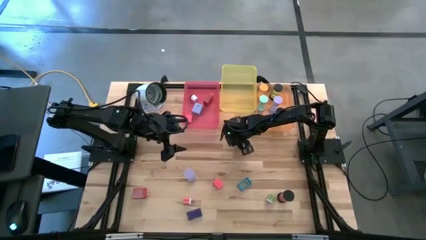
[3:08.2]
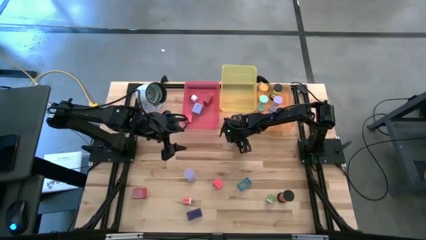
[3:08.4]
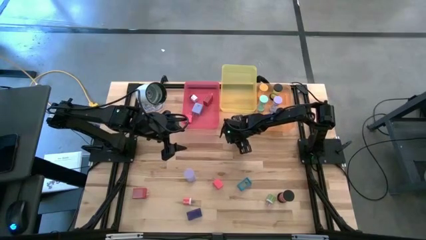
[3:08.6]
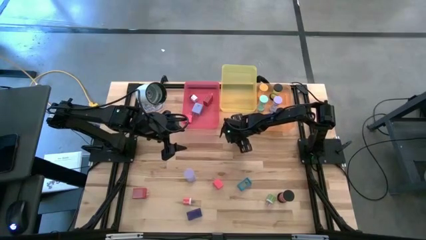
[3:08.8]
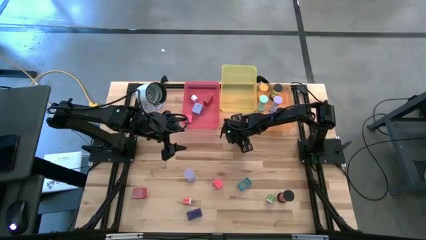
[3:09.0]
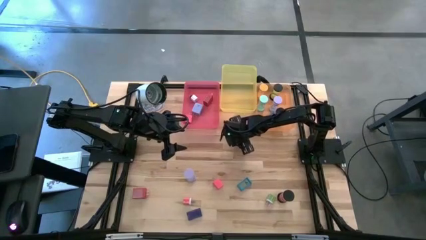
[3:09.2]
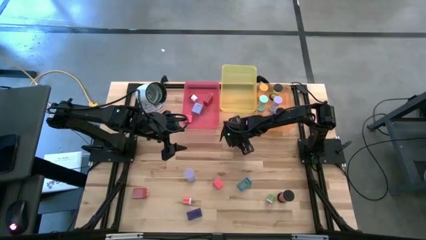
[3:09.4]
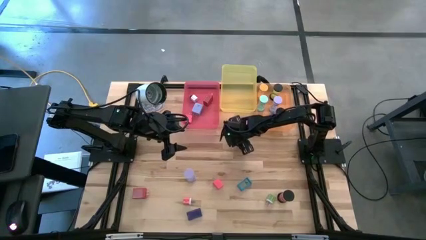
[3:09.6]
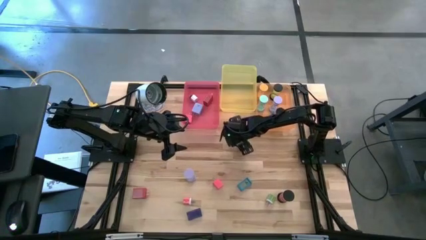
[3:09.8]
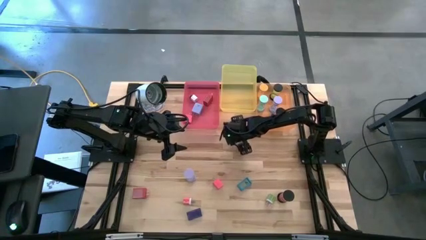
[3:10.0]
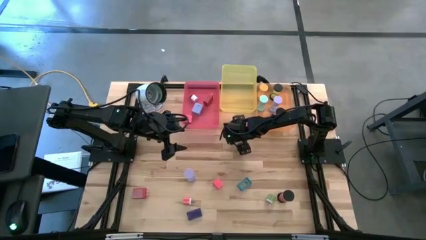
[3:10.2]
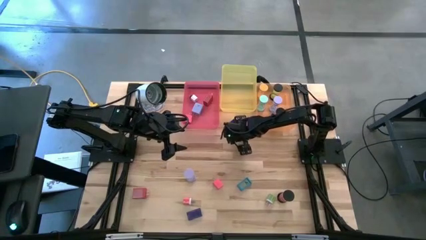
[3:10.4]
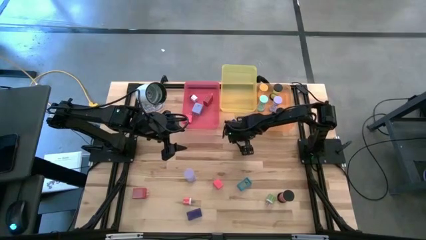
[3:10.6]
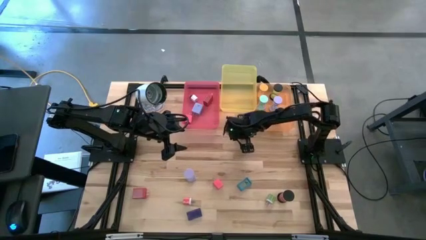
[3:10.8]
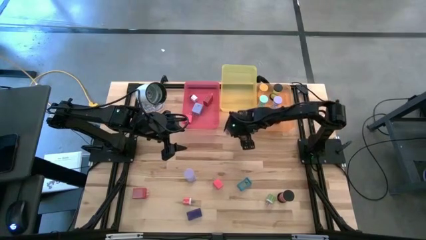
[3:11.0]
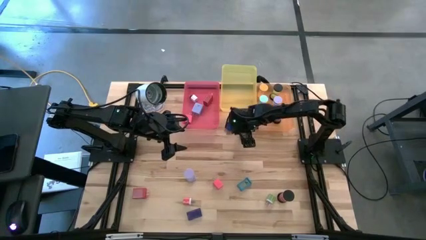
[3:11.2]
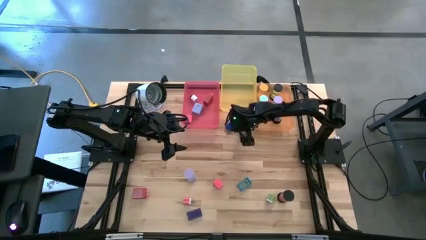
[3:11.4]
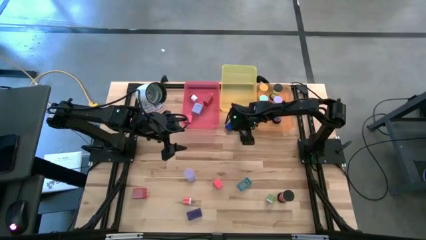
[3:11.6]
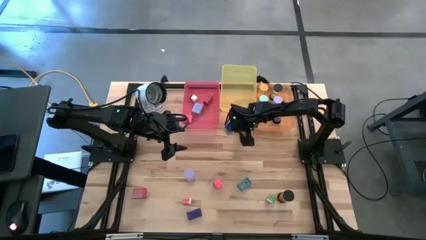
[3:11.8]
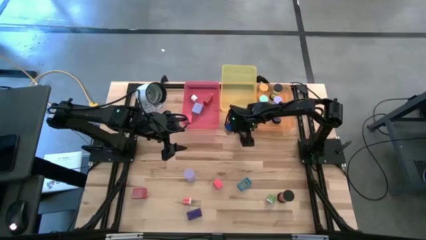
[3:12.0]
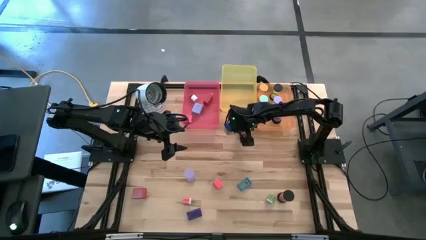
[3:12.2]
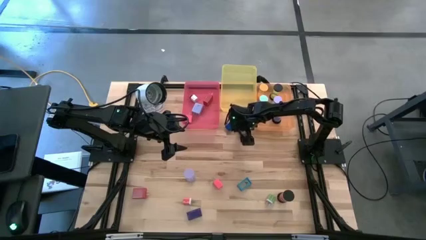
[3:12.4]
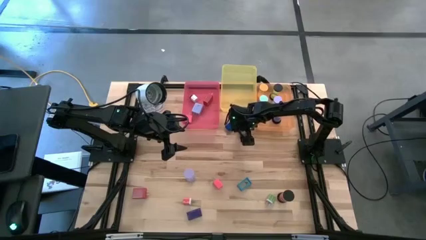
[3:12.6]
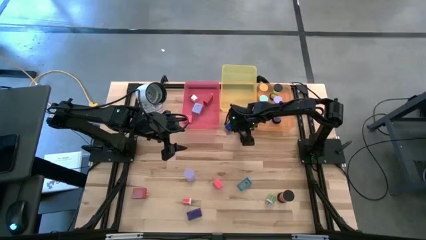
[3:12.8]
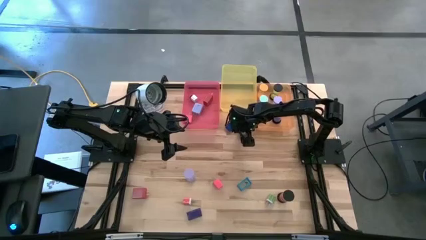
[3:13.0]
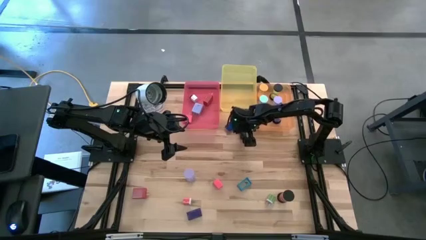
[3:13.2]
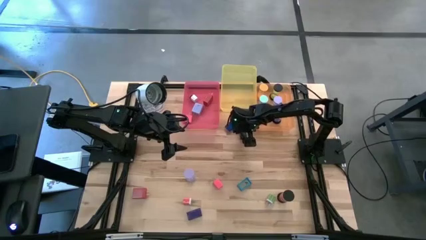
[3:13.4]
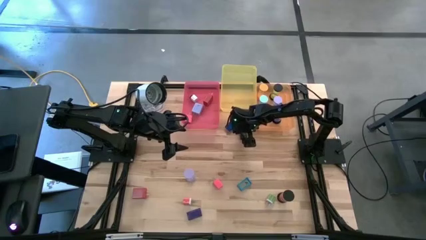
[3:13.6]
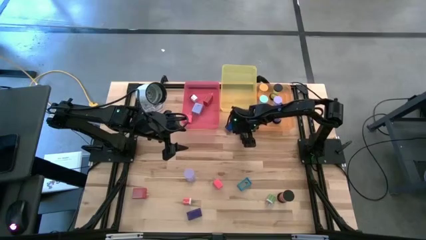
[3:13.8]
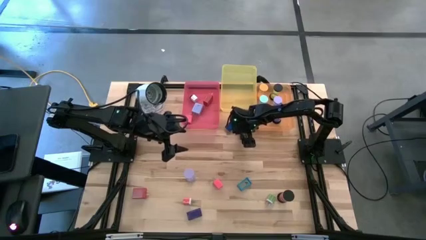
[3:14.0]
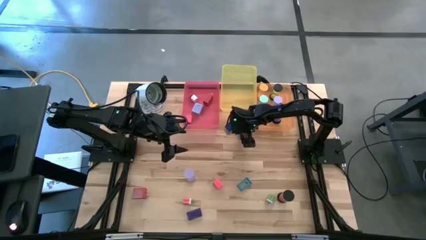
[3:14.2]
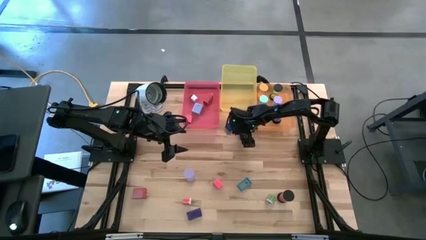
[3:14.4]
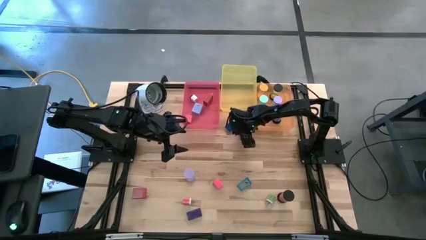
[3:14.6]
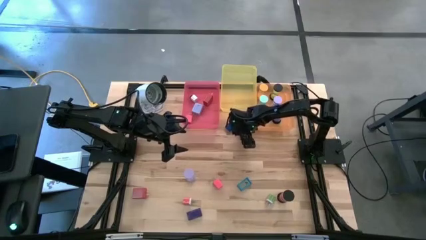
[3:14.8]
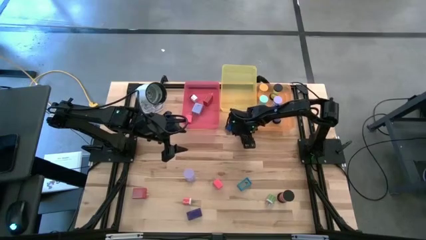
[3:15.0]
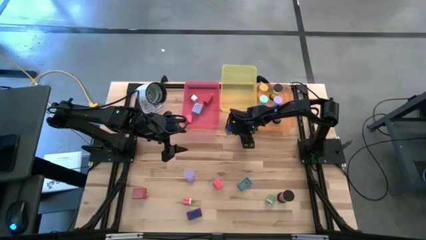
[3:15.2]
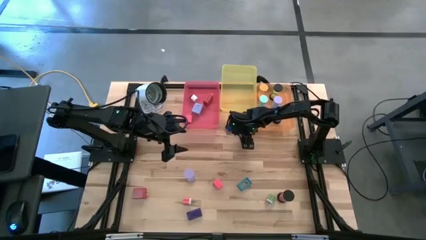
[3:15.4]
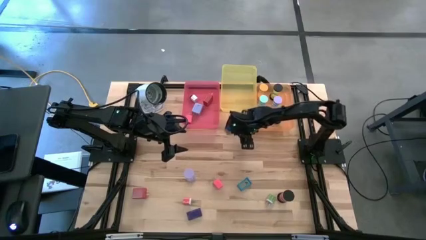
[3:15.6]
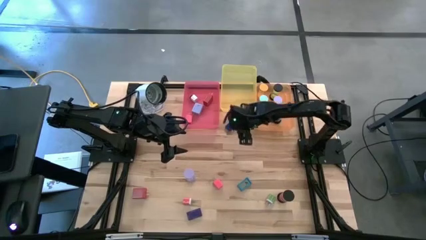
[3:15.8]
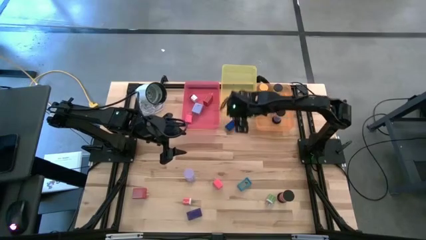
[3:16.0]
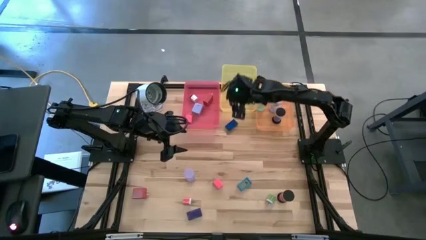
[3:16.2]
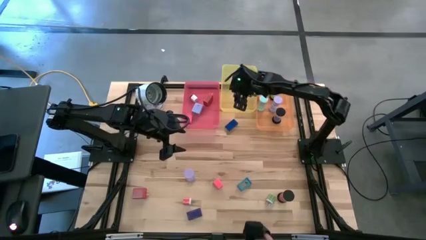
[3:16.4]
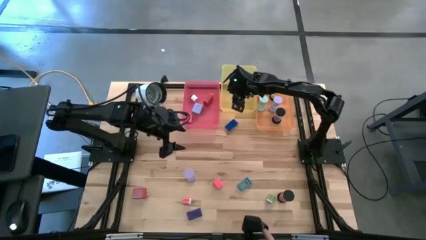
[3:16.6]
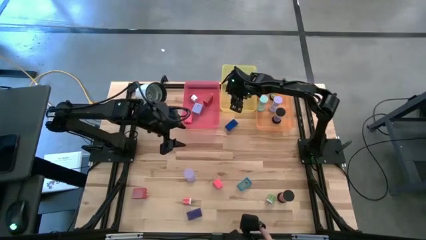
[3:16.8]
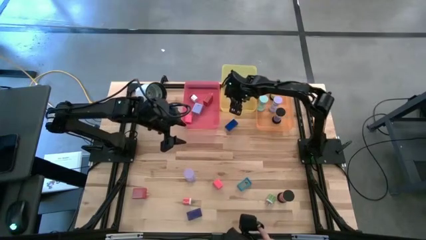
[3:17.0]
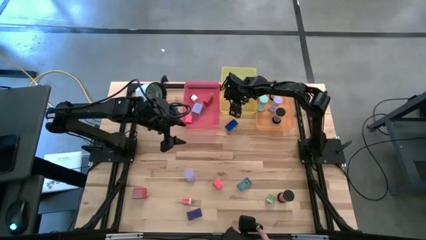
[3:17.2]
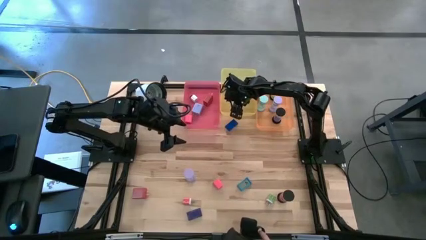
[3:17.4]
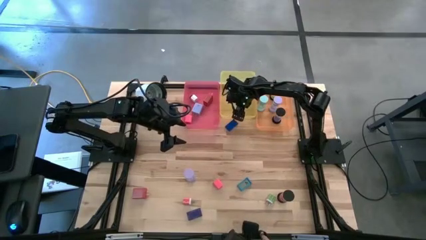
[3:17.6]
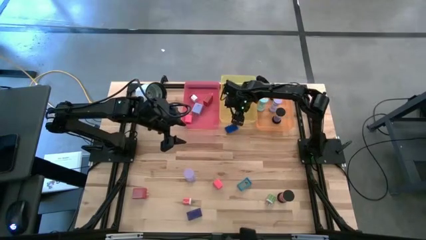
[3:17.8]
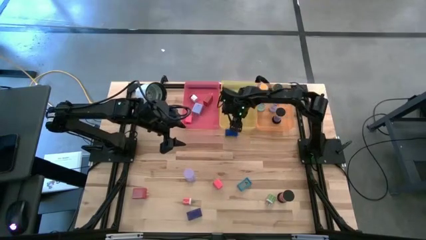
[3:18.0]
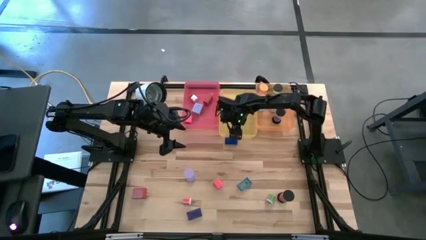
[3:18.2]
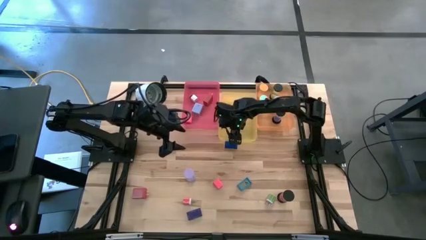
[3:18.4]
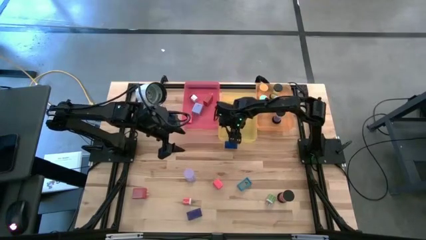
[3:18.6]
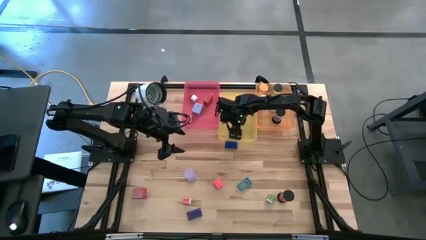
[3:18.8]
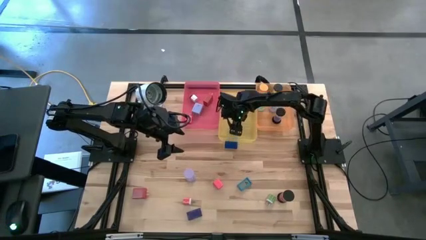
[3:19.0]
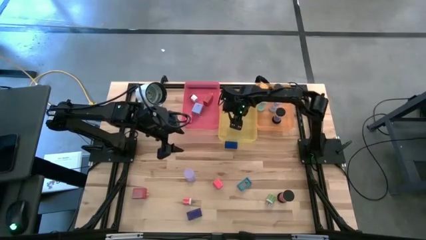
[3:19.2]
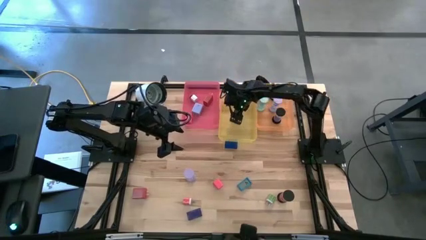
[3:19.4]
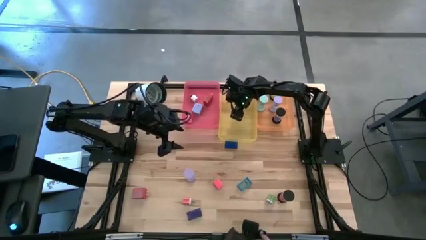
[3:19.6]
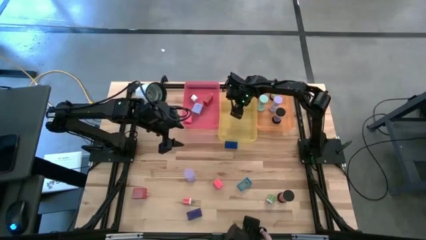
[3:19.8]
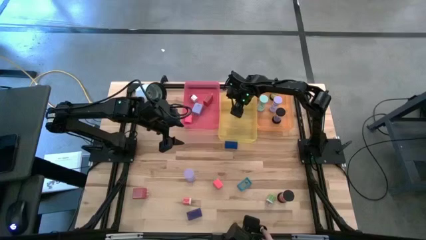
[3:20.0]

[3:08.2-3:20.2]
Task: Pick & Place Office items
Put the top purple digital clock into the yellow bin

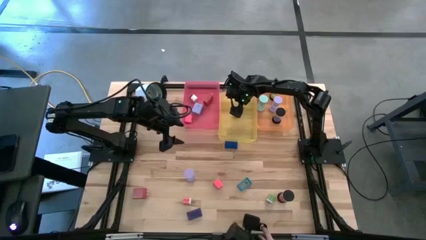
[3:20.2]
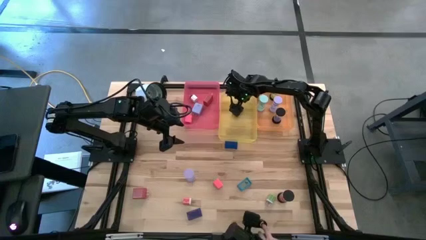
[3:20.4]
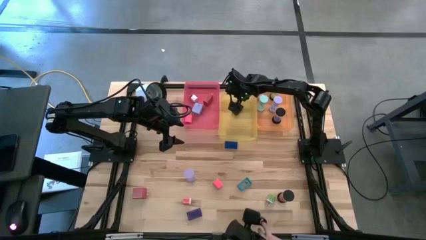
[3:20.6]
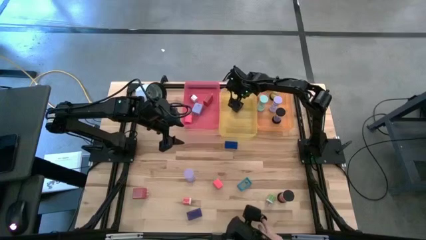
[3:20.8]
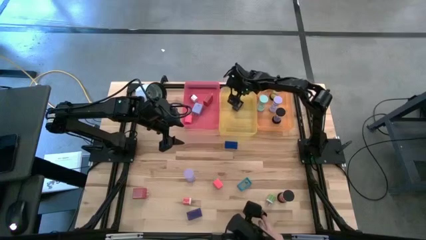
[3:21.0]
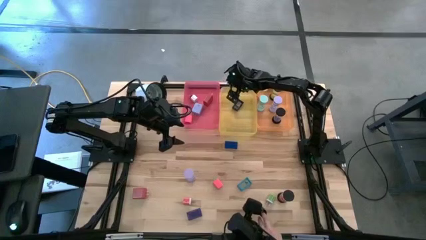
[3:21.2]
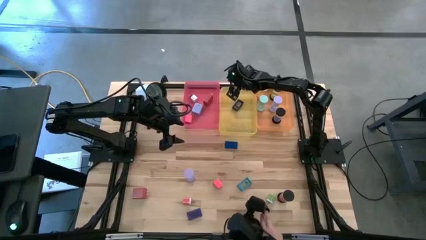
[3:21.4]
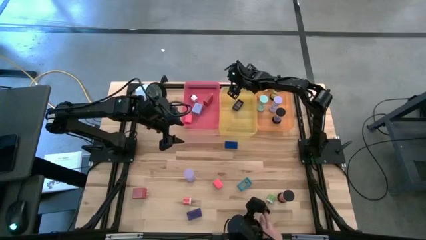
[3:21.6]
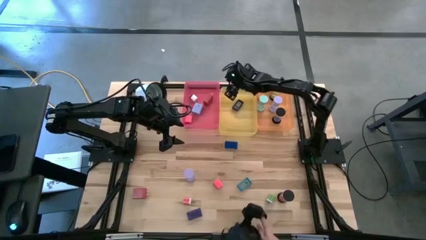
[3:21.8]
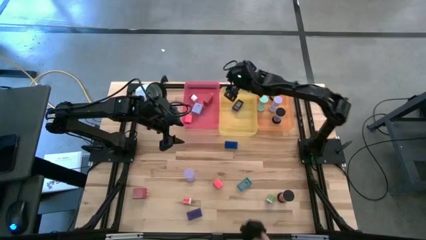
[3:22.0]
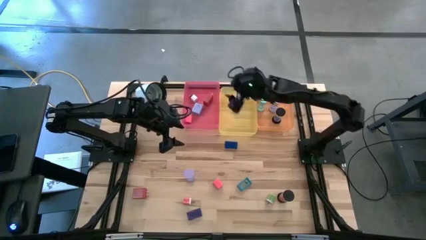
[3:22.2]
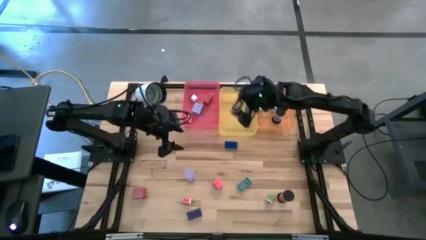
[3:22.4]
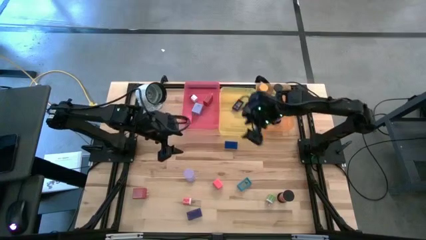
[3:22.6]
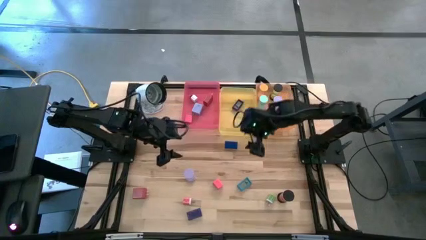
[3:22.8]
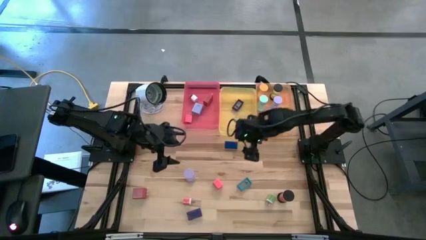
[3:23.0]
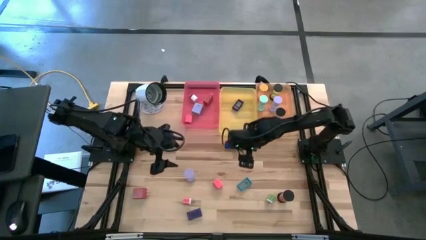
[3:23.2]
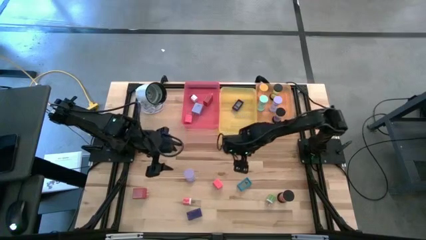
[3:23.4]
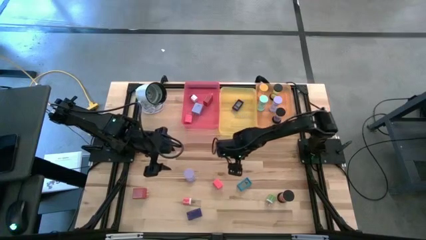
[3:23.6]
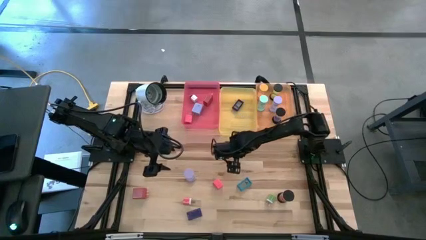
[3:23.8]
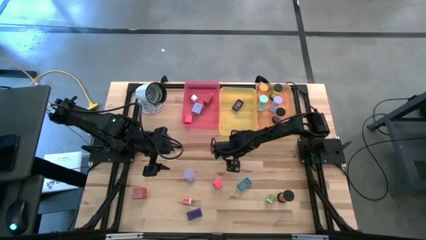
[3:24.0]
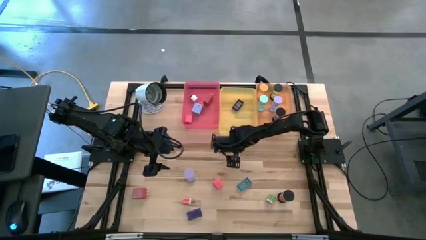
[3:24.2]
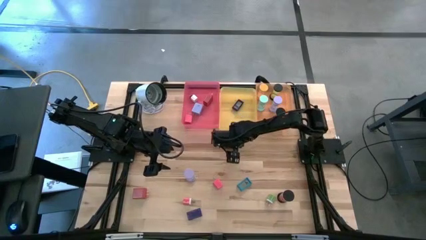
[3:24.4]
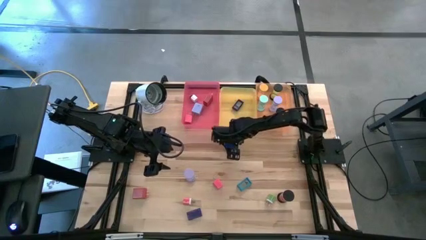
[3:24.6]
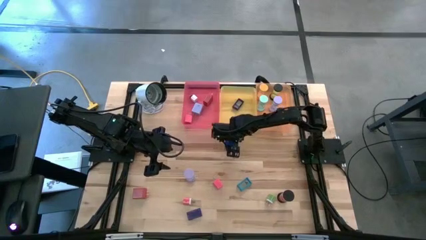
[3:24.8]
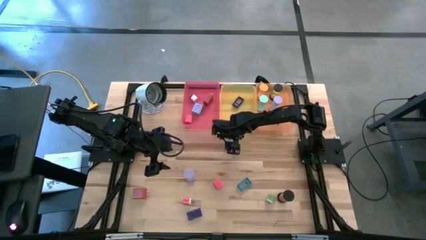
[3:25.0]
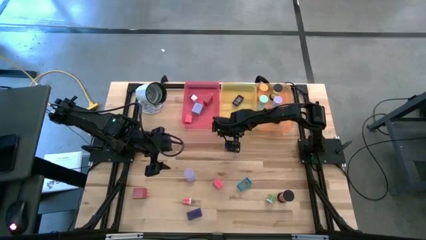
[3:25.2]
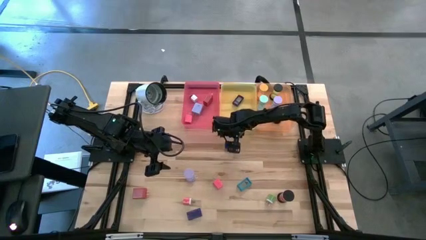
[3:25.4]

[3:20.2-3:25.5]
Adjust the yellow bin
